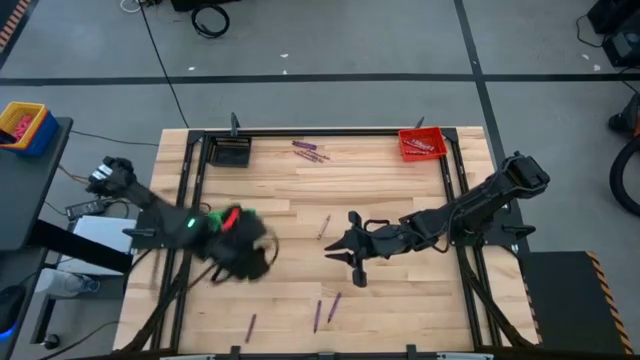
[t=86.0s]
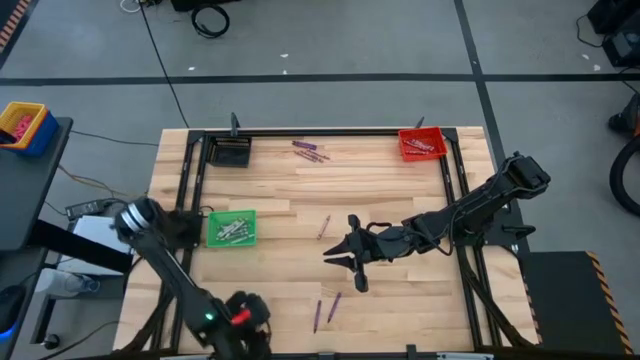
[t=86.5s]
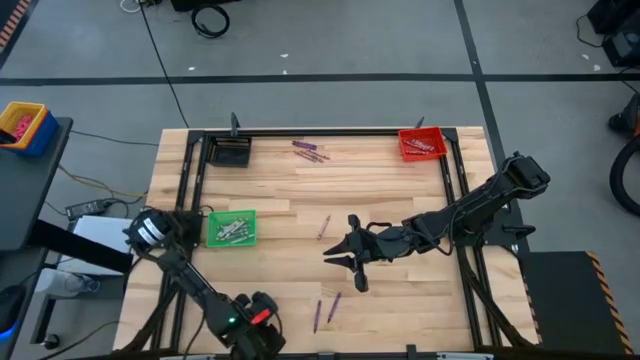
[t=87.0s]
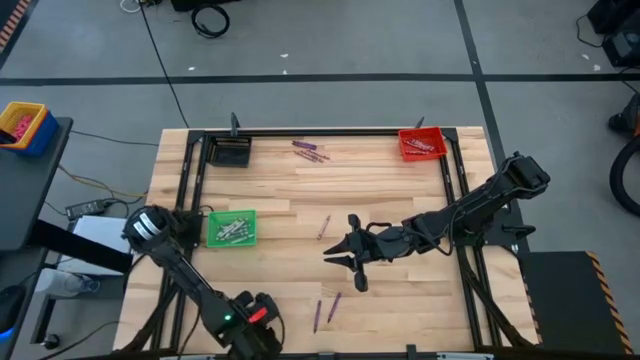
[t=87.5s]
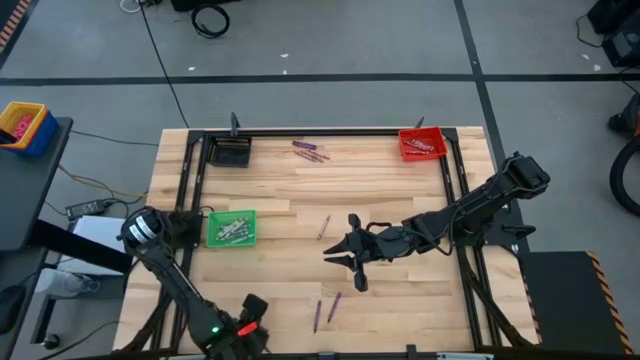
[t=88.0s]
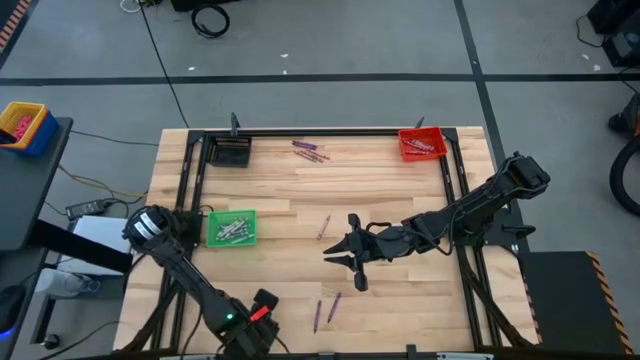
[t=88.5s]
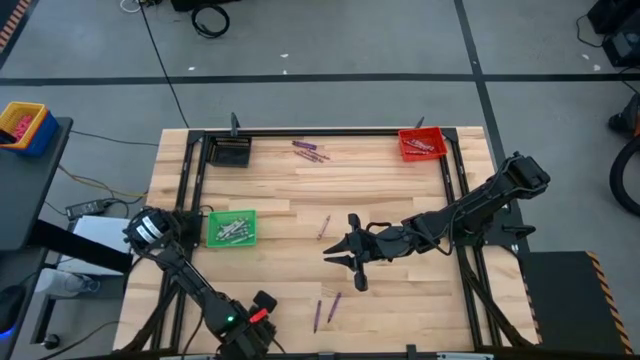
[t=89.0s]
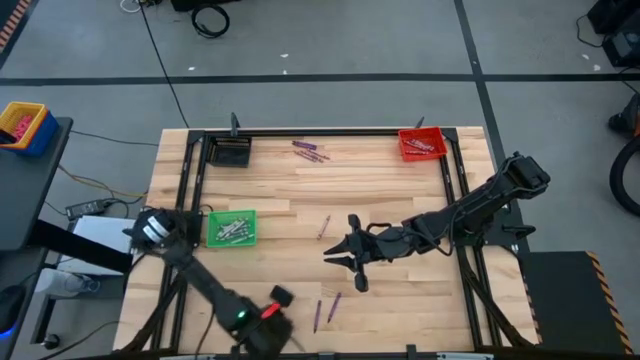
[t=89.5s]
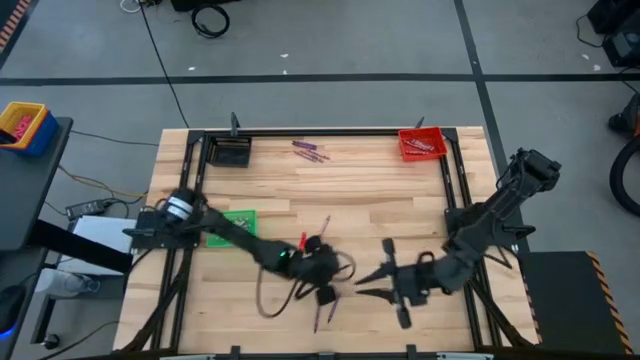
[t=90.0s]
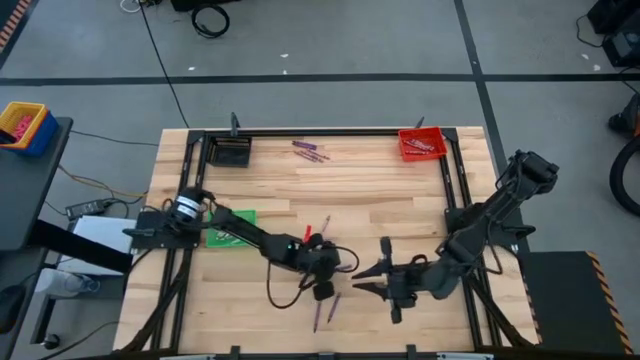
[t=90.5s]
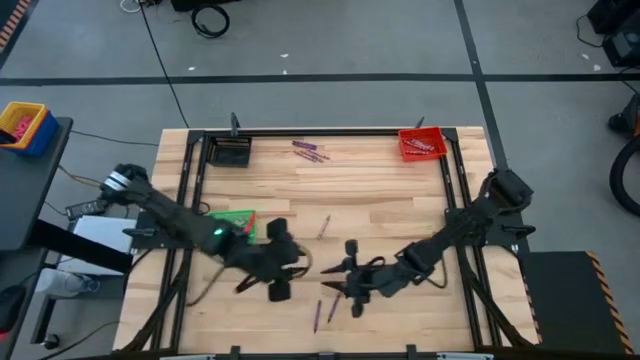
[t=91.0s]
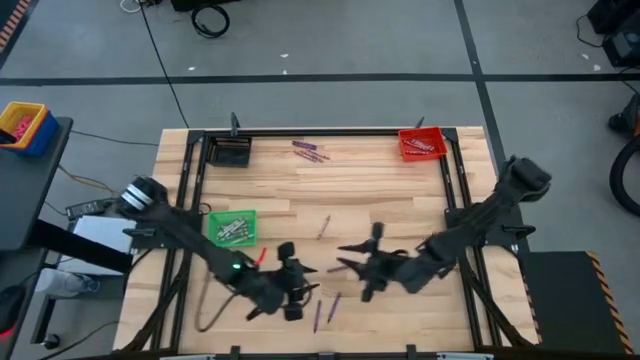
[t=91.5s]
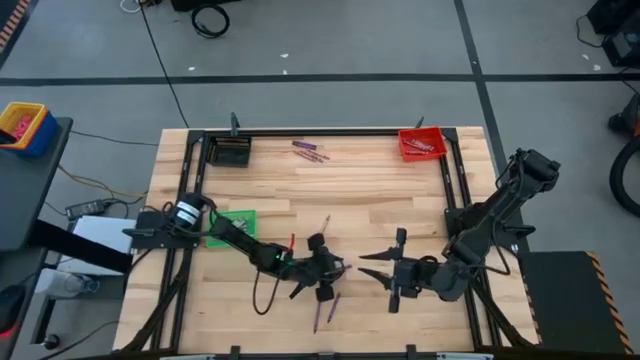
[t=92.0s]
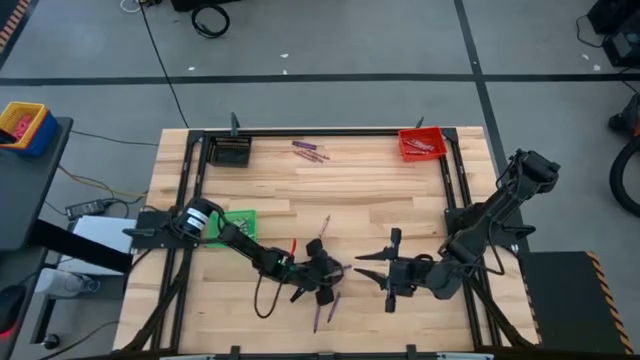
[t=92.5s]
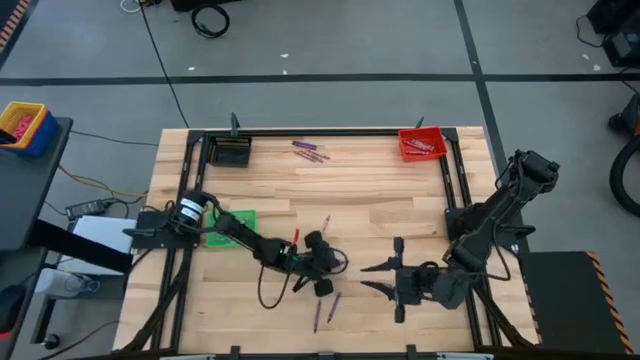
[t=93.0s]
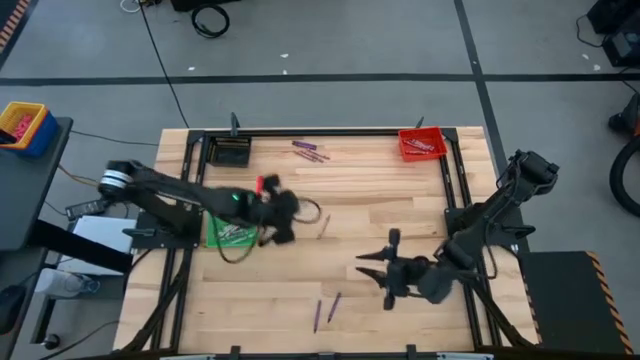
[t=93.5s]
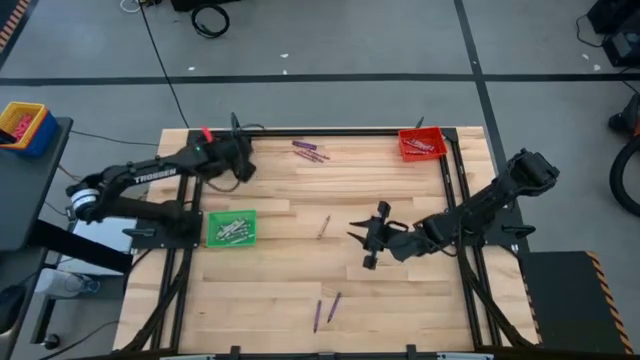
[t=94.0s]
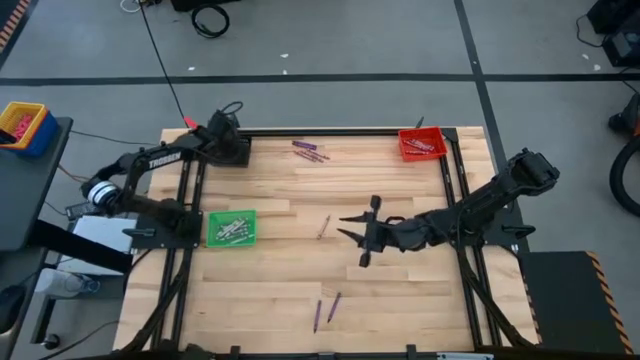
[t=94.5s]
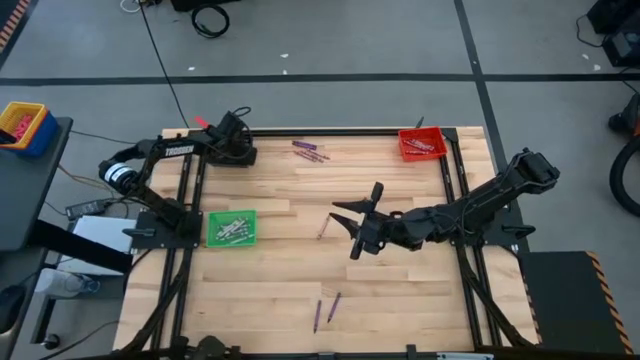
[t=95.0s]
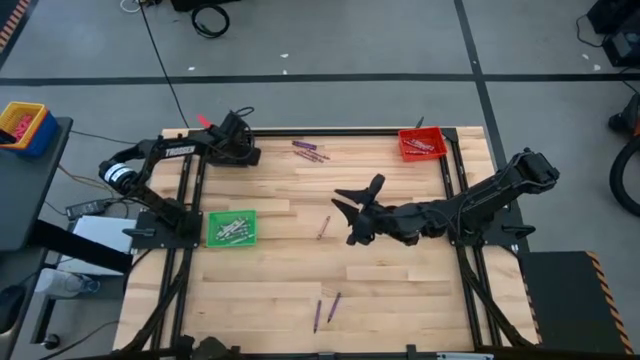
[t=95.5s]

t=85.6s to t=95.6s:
Task: Sort crayons
Put the violet crayon into the black bin

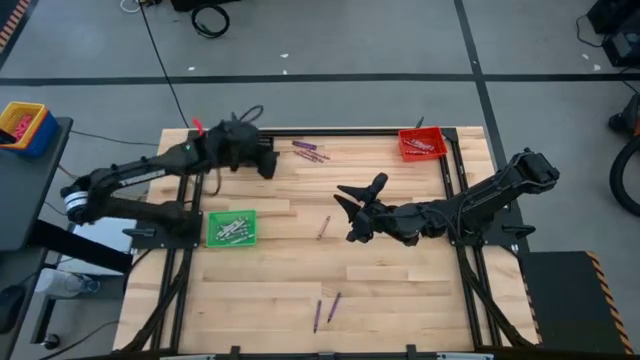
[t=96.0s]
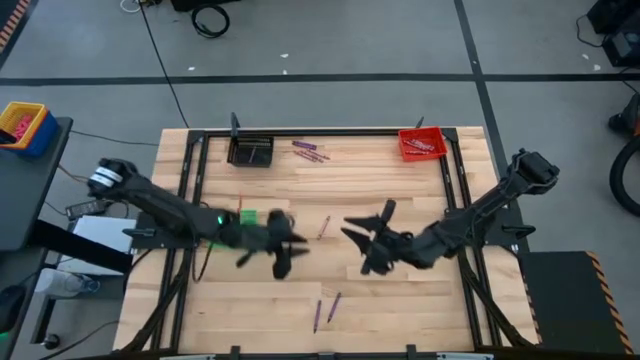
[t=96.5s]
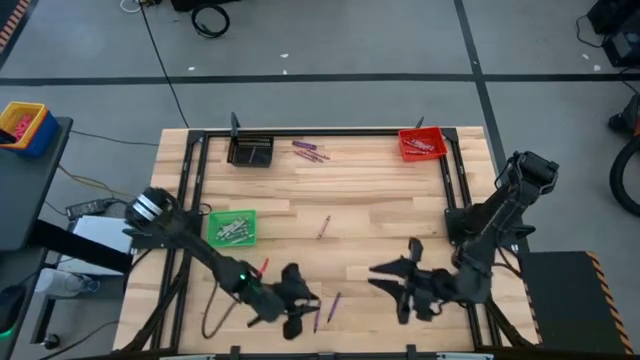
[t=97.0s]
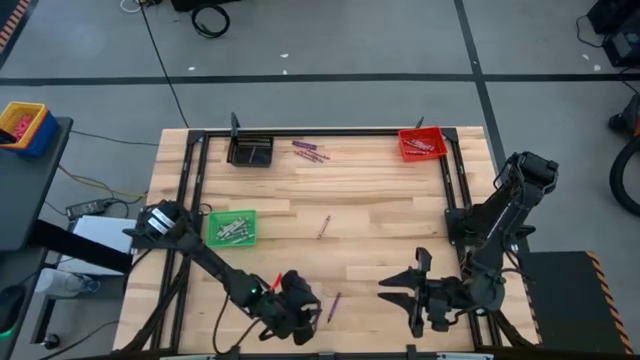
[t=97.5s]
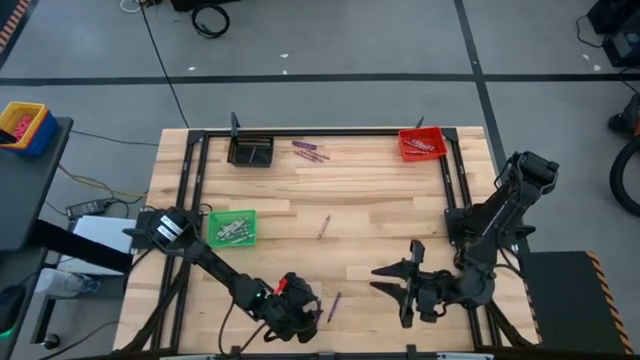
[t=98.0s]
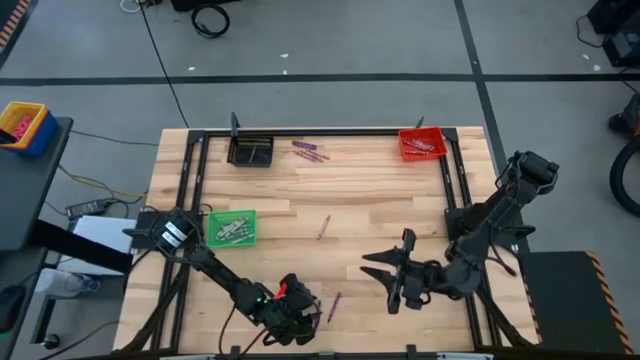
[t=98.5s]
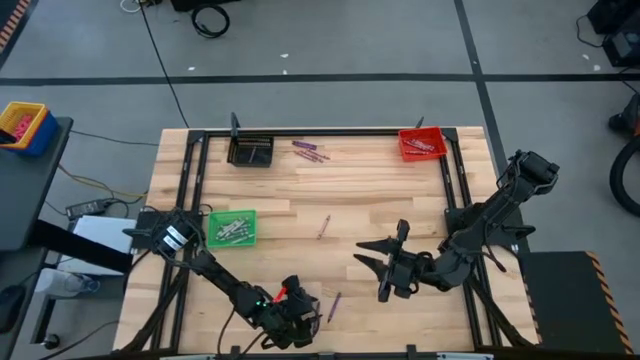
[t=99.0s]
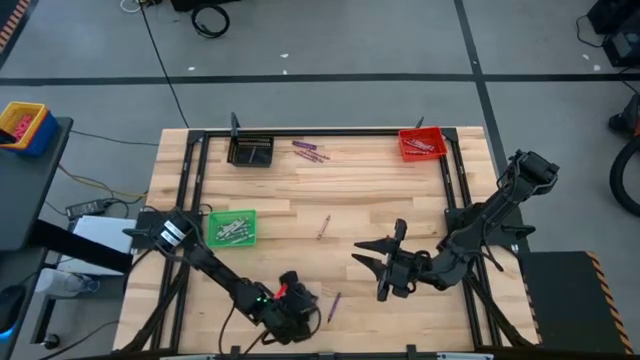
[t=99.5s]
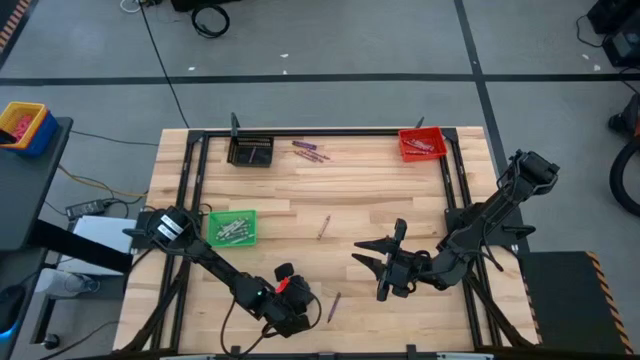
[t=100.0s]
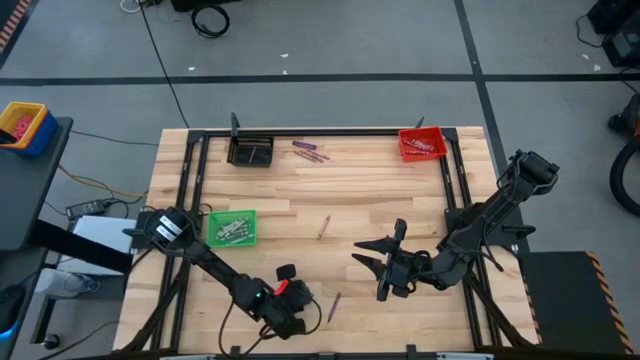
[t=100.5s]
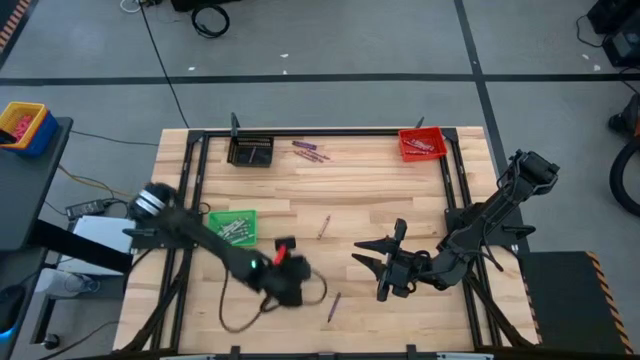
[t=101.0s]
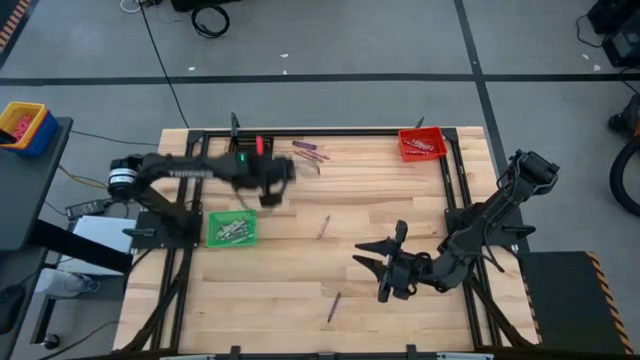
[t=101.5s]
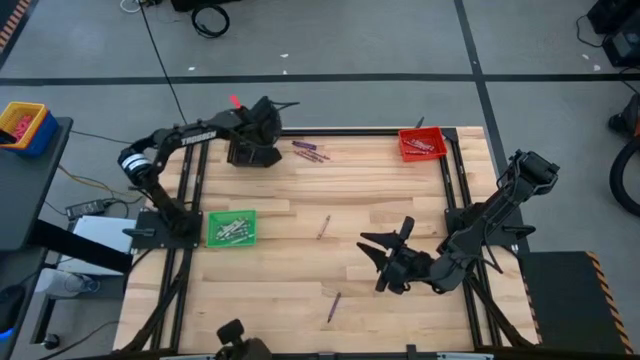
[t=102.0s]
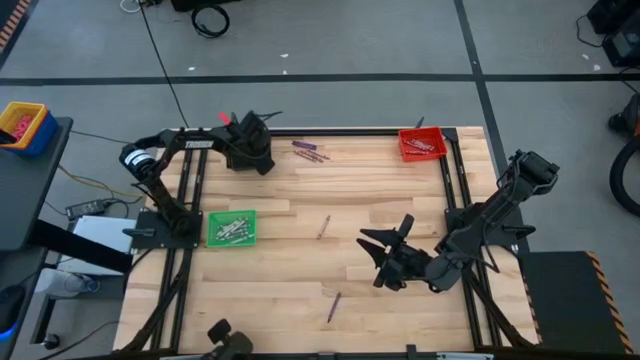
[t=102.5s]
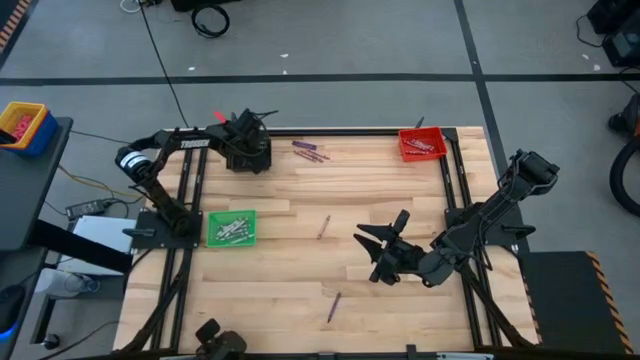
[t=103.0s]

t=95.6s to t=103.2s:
Put the violet crayon into the black bin

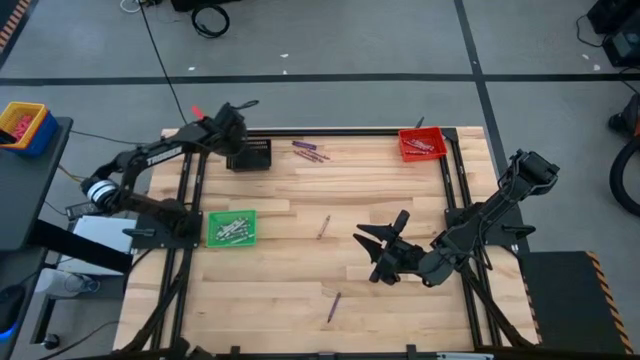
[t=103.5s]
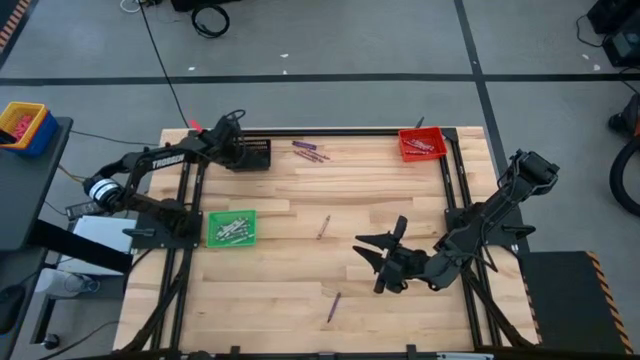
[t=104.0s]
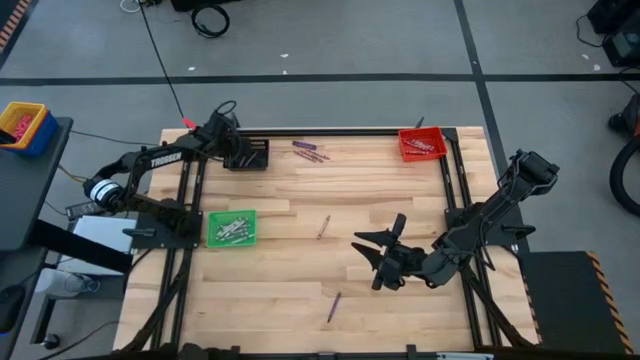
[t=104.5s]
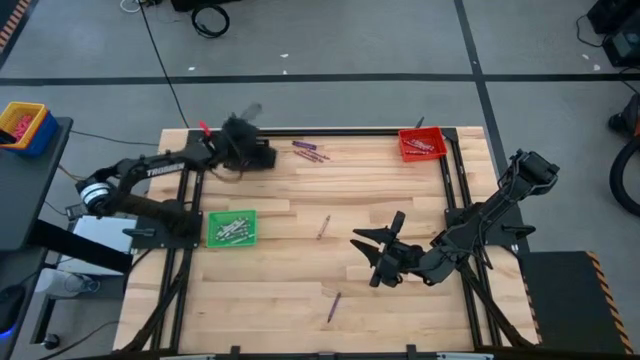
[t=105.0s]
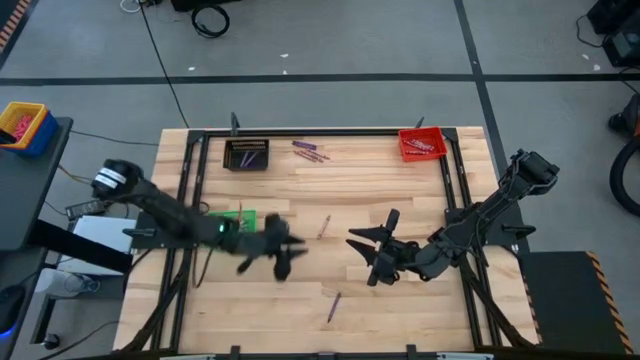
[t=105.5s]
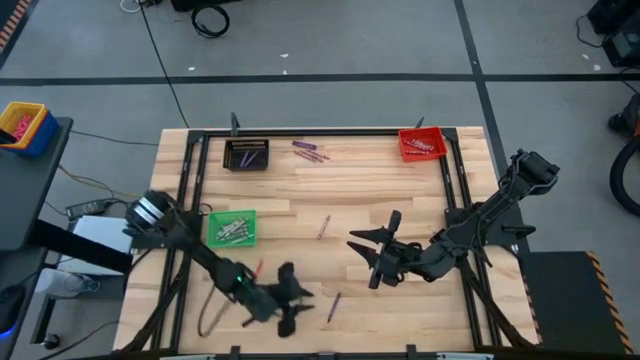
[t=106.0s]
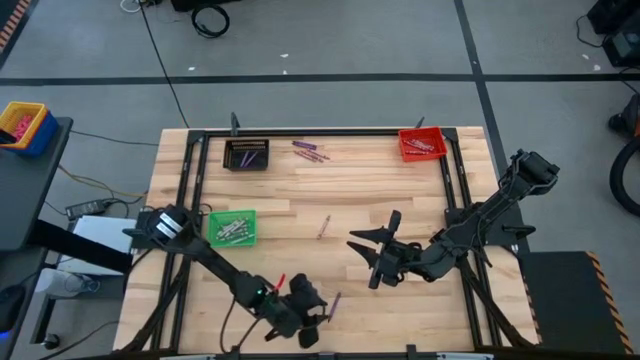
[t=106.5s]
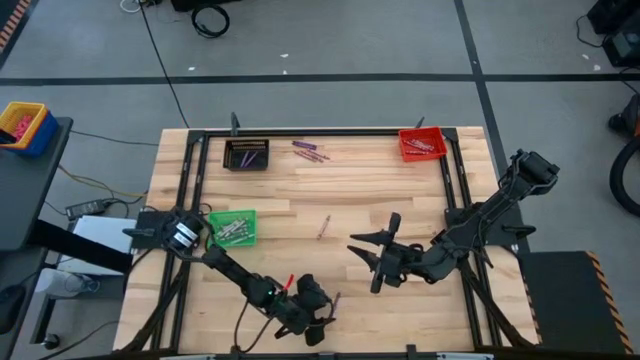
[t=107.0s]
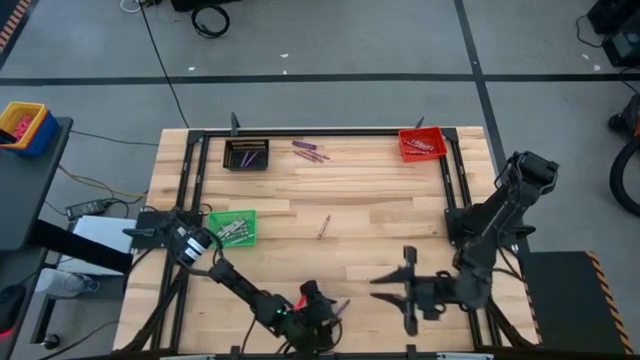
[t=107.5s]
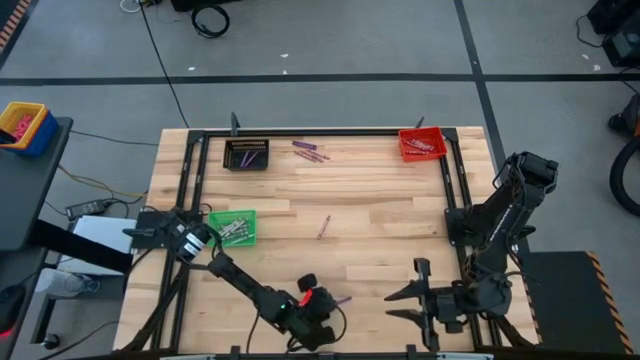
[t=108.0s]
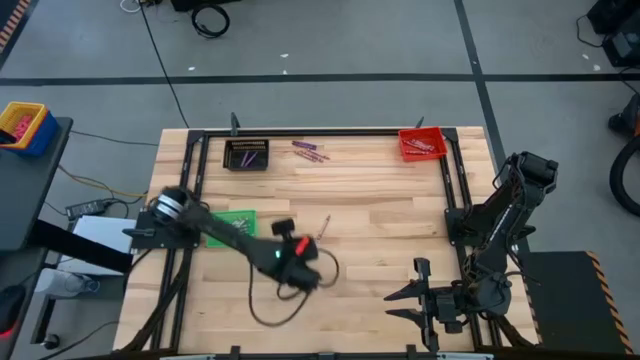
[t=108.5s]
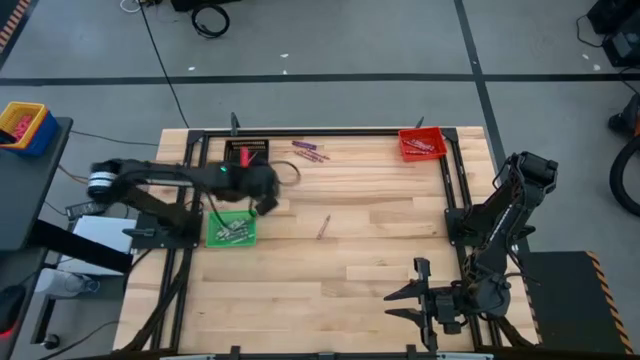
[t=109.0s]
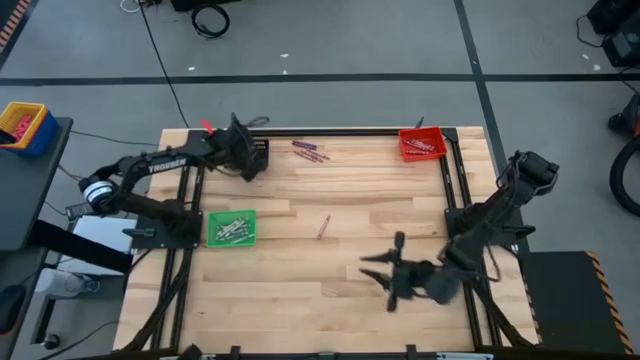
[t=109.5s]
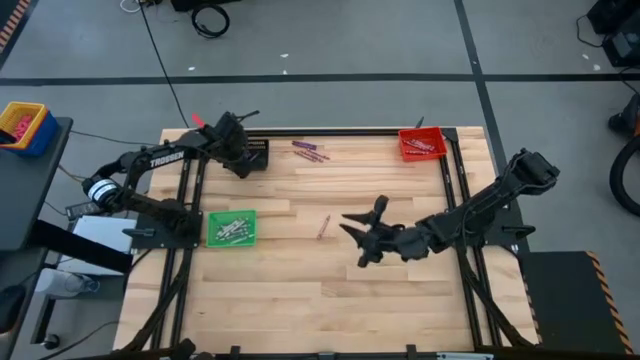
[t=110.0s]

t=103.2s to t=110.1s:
Put the violet crayon into the black bin
